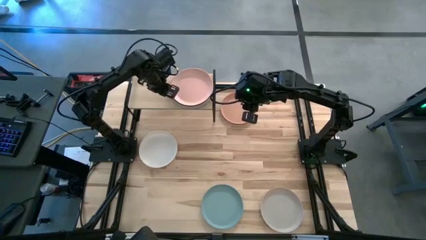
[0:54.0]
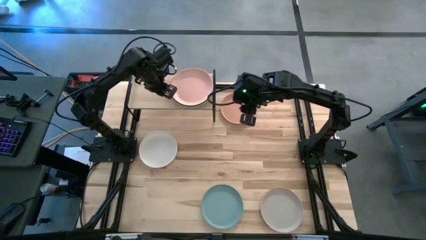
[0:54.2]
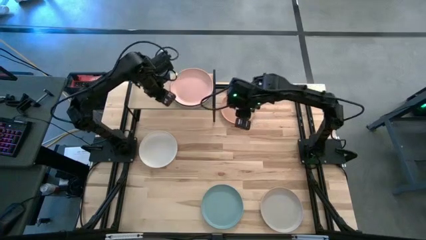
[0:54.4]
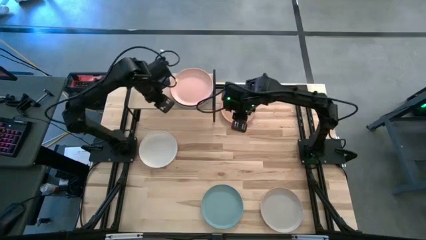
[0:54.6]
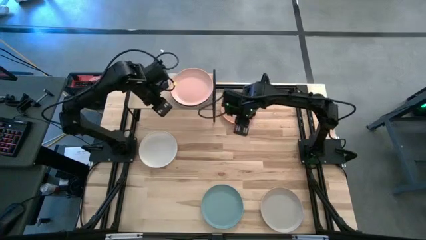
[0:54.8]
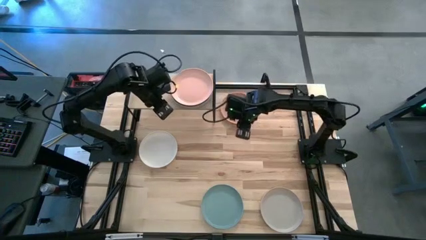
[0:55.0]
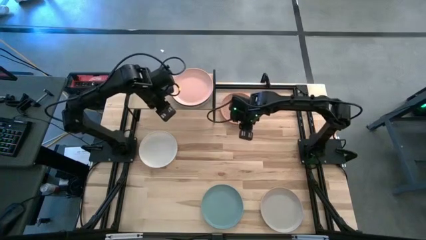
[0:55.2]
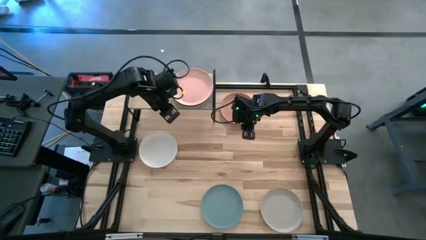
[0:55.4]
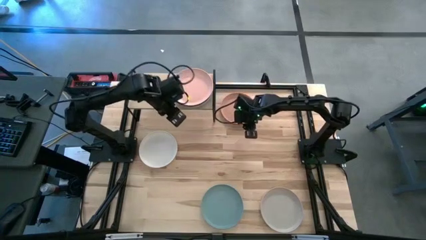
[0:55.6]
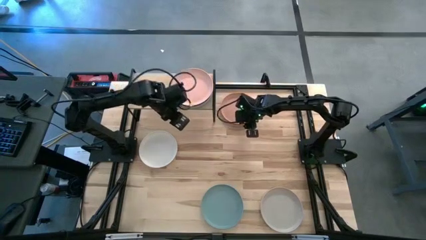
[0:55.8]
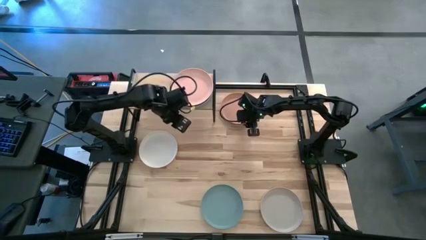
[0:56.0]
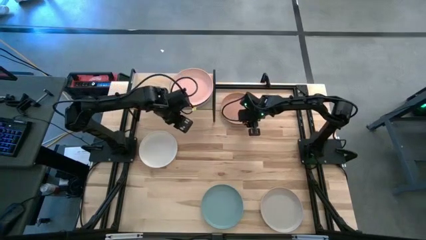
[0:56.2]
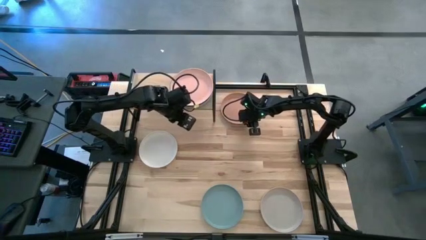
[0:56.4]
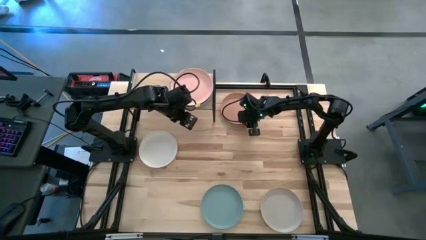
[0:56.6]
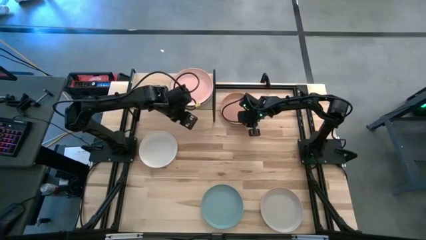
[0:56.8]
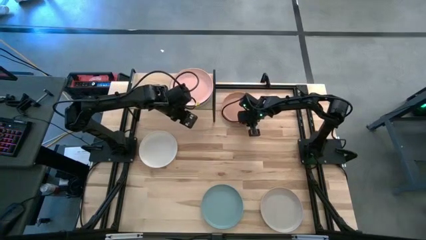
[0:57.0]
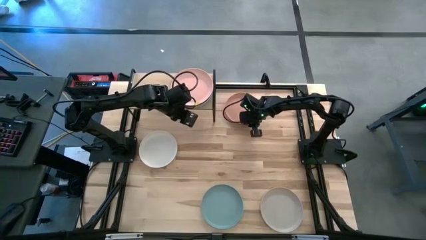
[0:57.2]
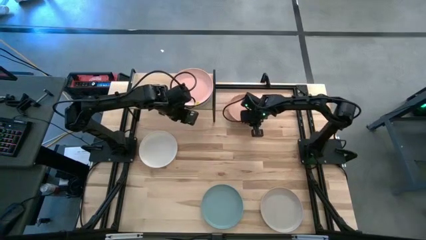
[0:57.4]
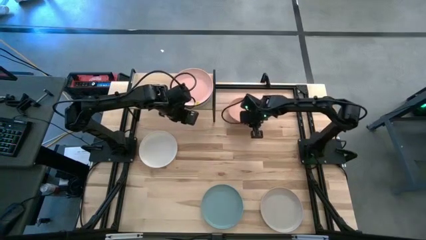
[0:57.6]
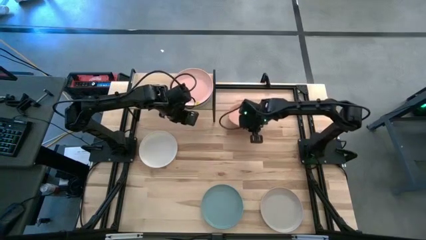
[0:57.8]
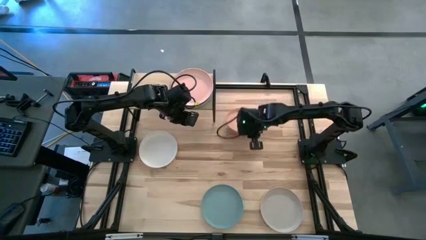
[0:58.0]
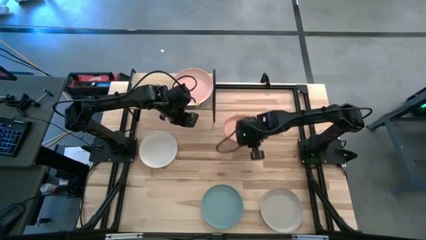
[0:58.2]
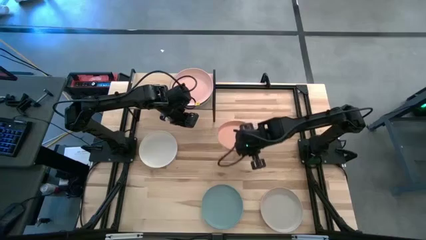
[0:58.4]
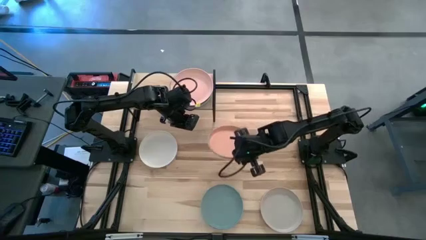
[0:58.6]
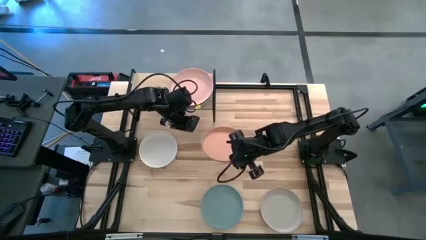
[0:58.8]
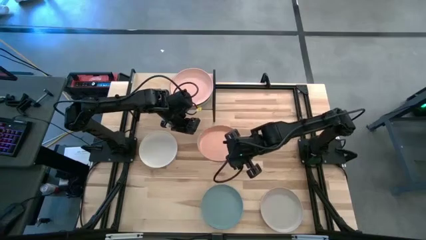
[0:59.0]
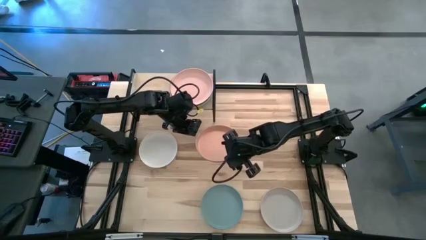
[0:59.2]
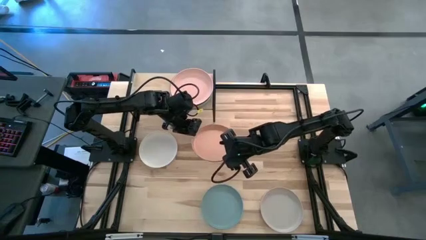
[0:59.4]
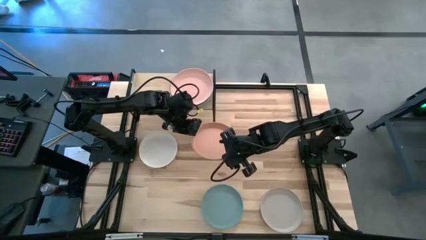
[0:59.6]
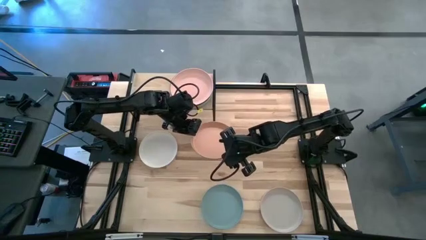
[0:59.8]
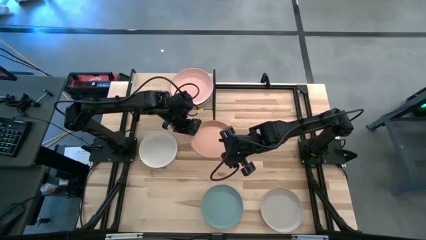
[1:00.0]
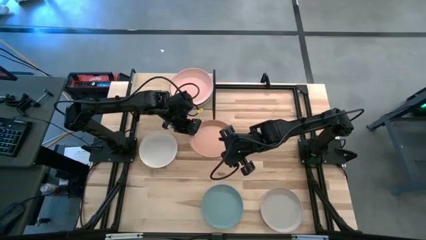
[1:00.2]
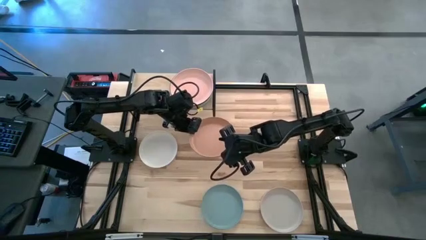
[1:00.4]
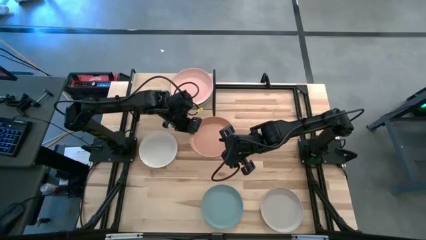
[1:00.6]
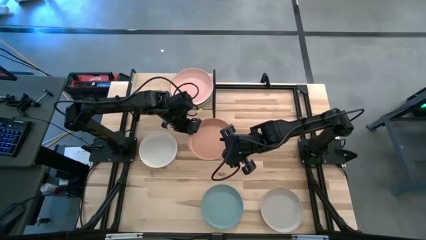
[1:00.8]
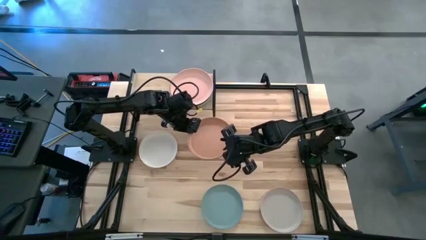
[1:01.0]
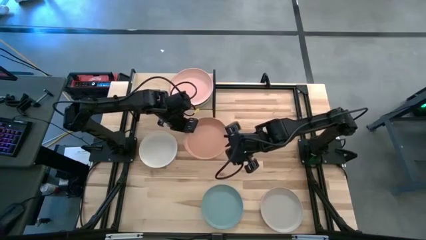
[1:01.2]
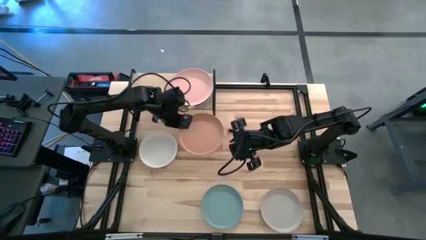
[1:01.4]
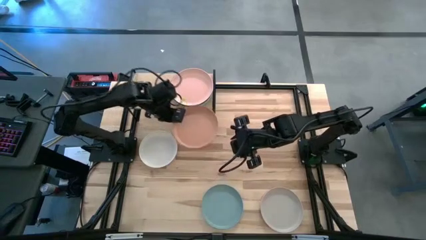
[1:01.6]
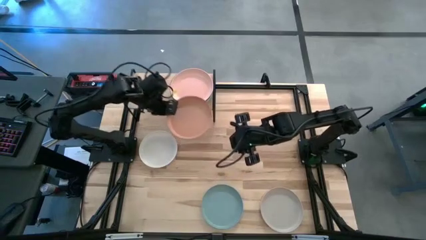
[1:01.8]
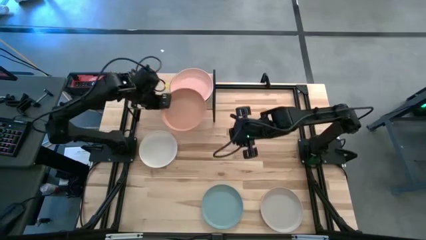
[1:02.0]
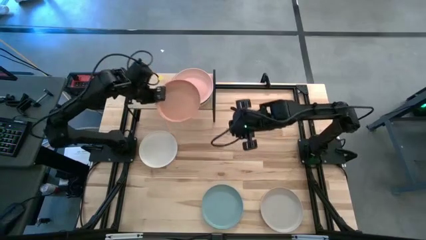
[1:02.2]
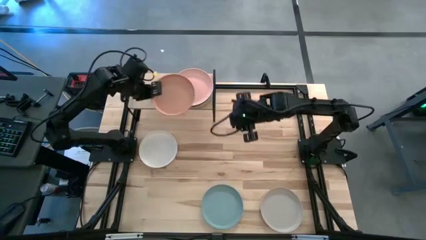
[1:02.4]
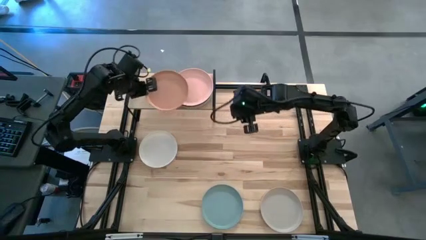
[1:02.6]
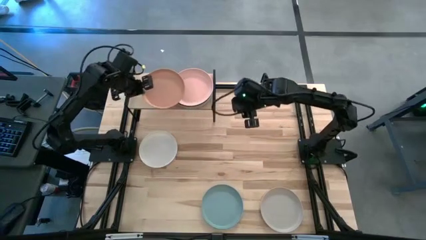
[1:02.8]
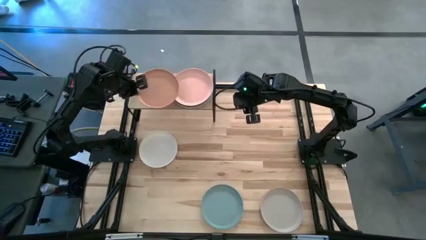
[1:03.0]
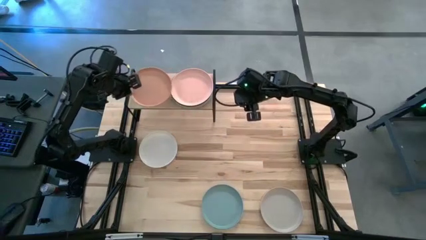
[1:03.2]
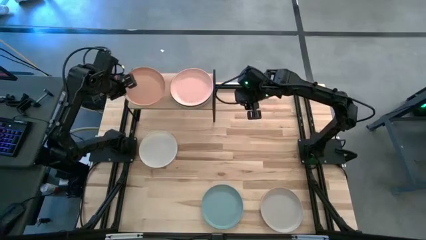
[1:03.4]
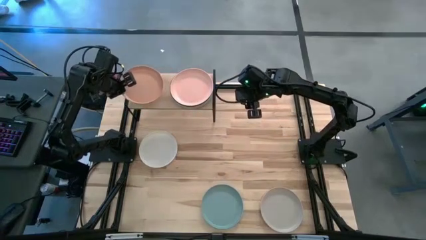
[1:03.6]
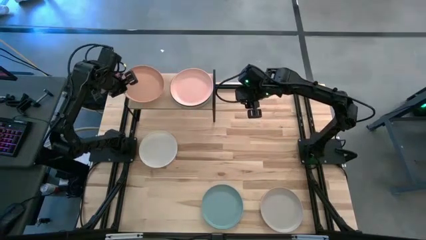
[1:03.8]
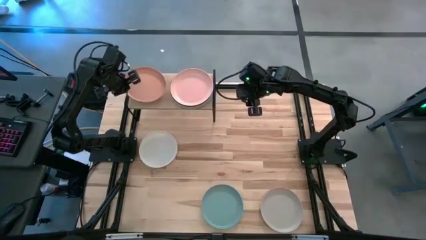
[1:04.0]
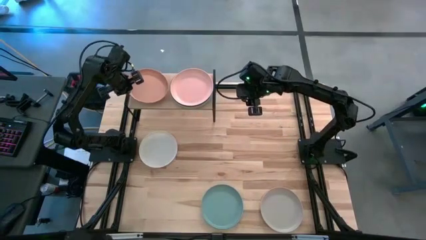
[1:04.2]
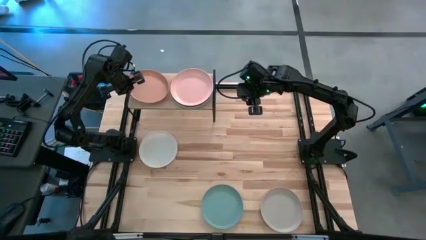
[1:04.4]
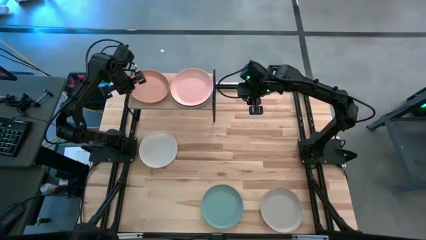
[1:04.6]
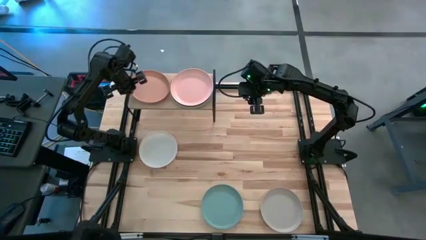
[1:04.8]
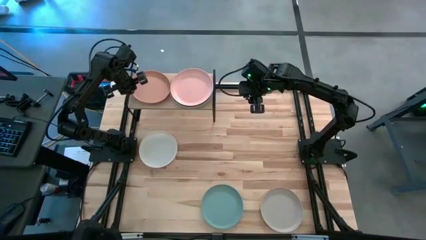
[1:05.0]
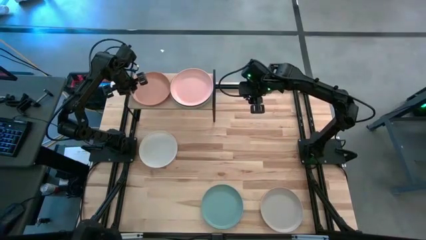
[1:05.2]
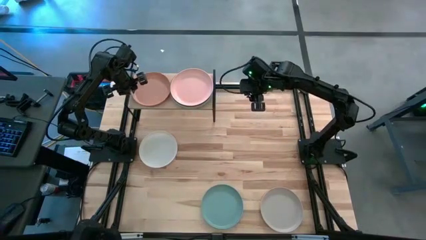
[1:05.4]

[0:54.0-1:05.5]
Task: Place and stack plates onto a shelf
Put the orange plate on the shelf

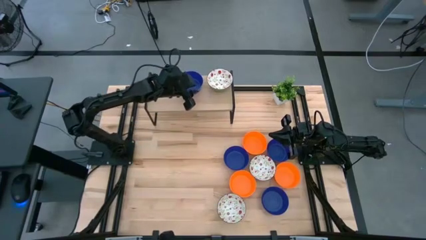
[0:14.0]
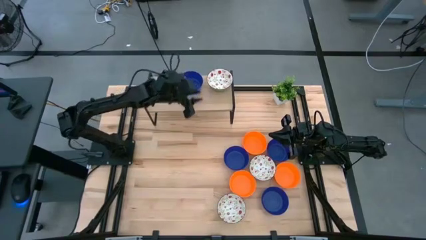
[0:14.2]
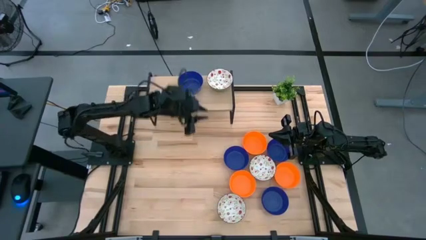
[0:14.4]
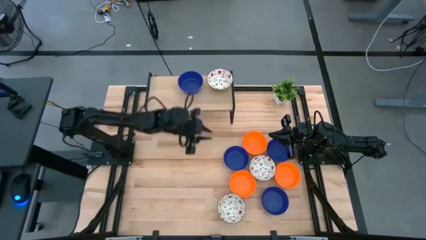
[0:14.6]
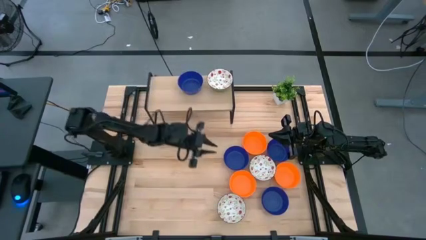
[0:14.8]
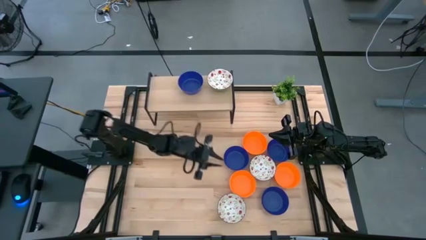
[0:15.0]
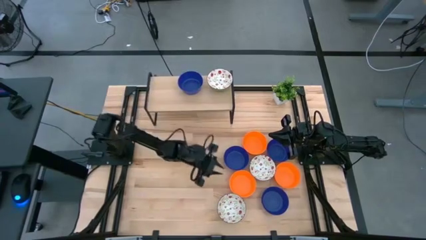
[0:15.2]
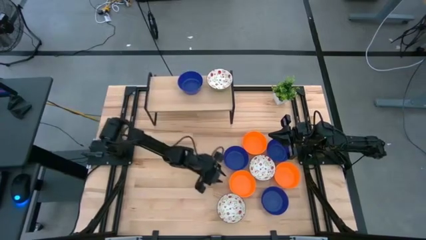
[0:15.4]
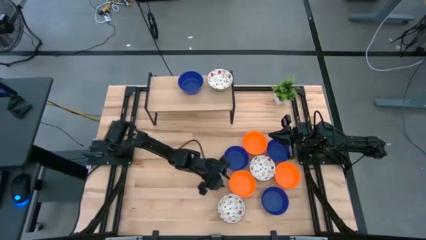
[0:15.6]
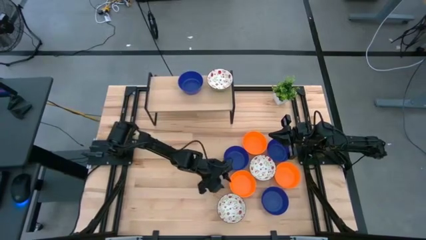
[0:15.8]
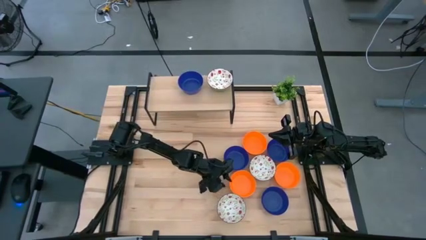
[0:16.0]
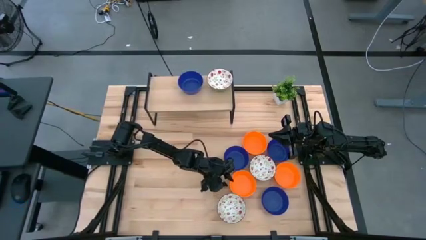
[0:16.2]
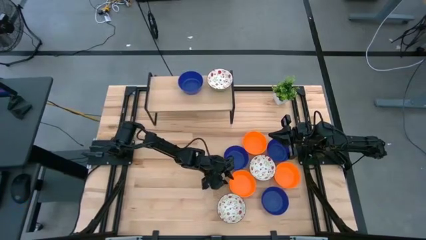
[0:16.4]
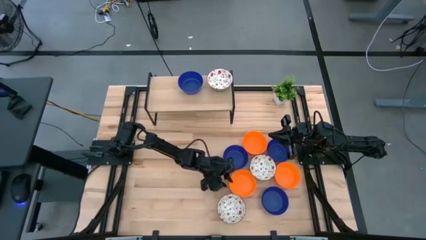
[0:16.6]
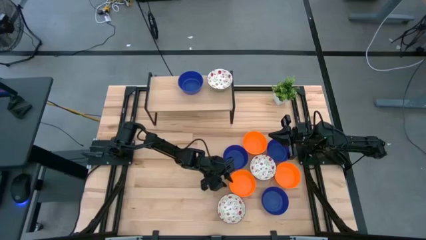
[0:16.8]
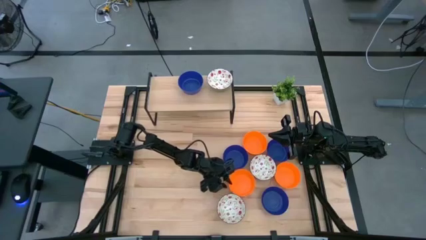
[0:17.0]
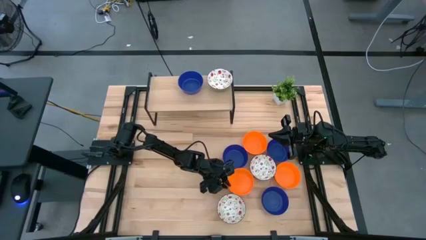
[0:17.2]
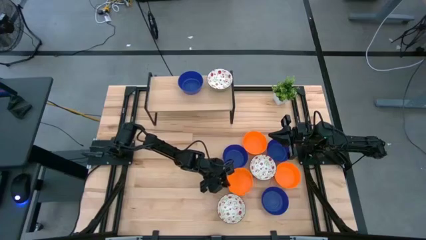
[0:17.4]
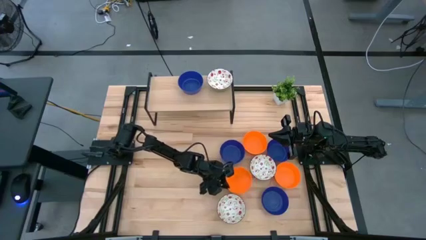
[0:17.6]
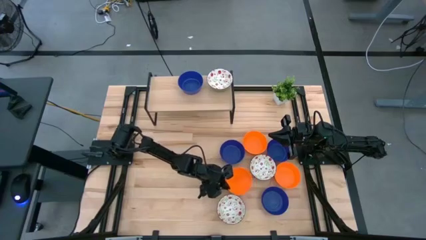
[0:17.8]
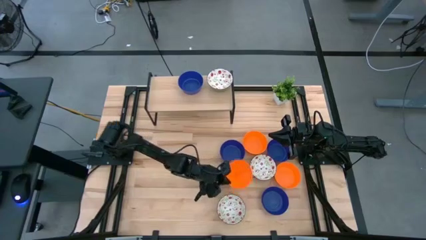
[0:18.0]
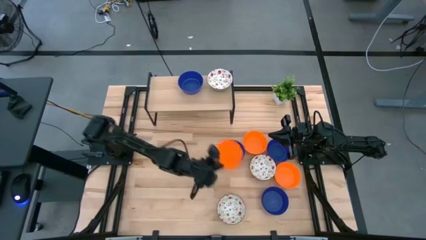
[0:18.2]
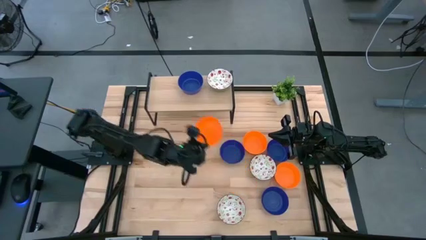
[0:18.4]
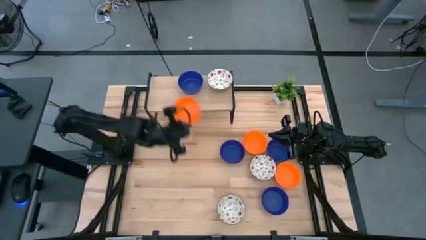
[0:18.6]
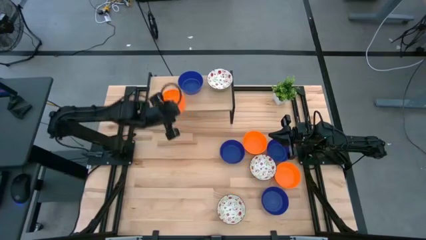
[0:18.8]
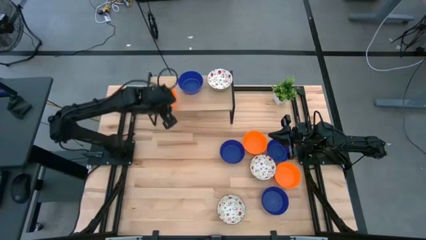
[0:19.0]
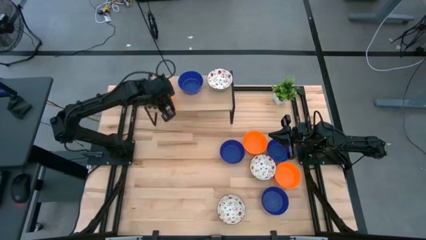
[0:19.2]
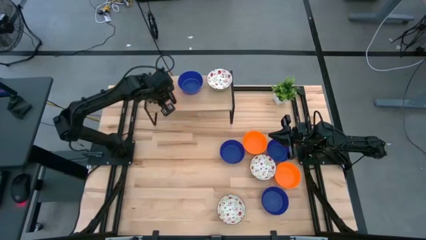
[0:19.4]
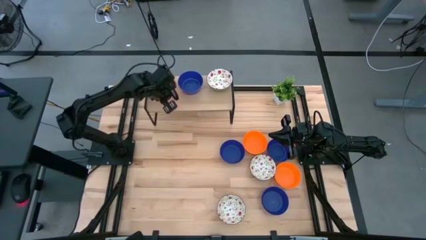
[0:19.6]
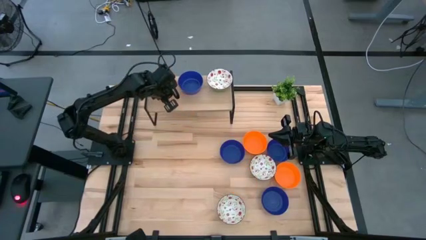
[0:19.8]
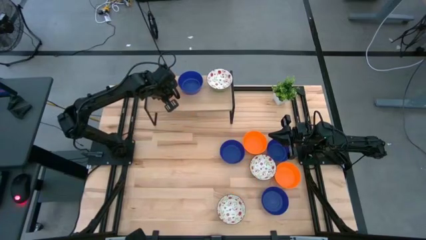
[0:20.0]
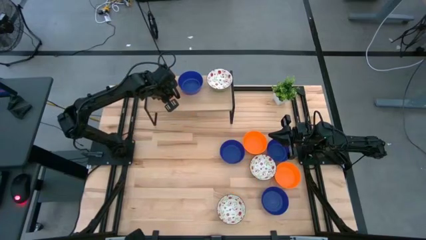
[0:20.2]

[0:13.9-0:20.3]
Task: Pick & Place Mini bowls
Put the bottom left orange bowl on the shelf
